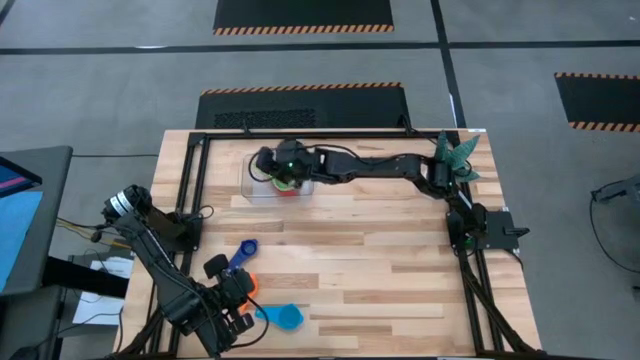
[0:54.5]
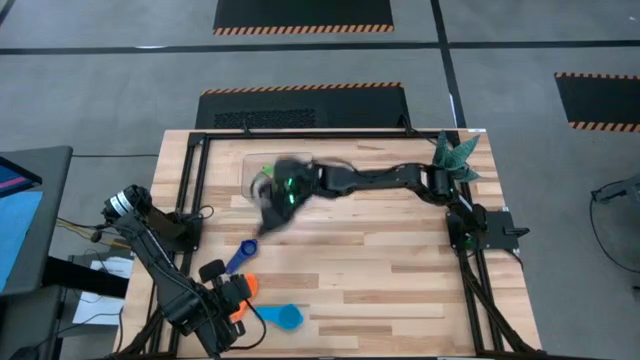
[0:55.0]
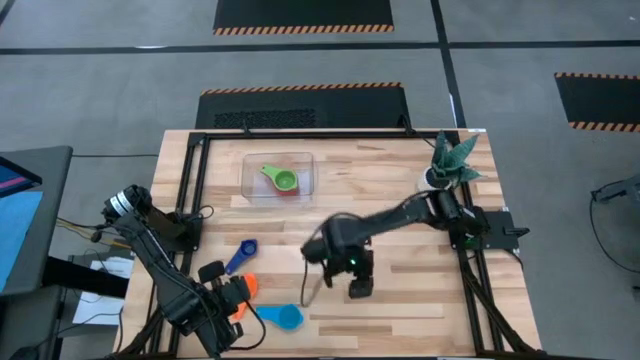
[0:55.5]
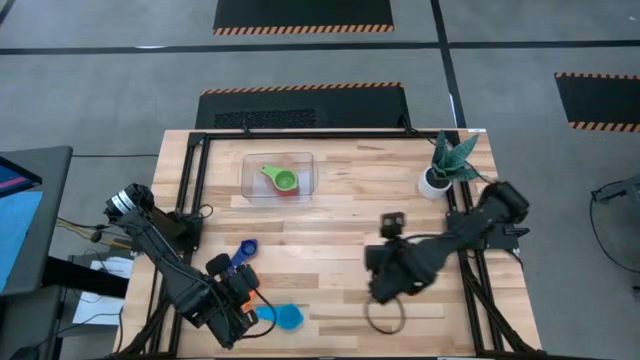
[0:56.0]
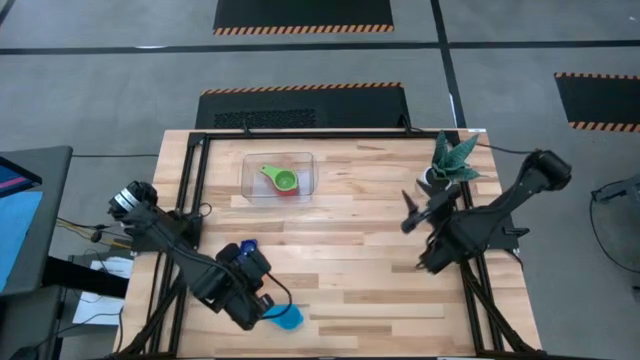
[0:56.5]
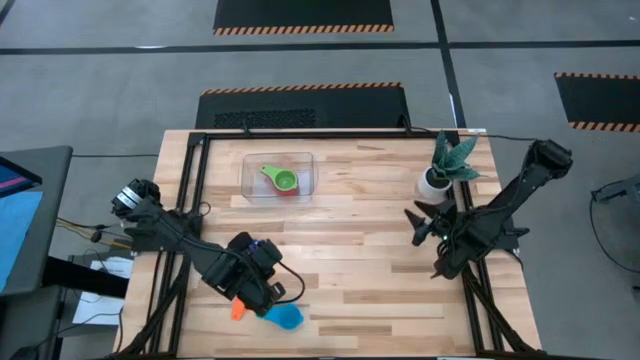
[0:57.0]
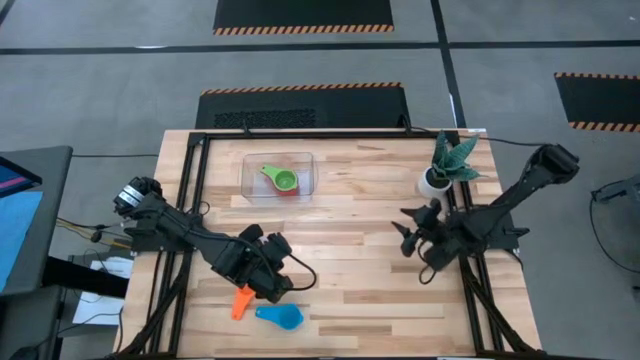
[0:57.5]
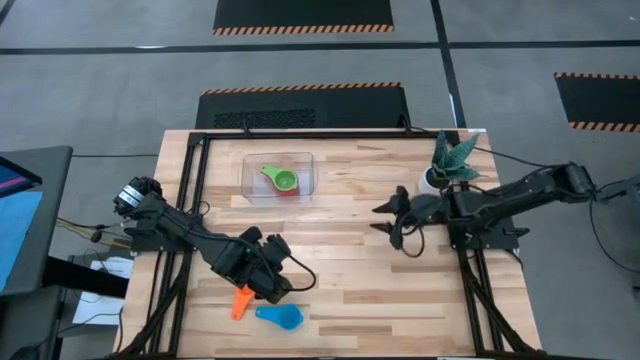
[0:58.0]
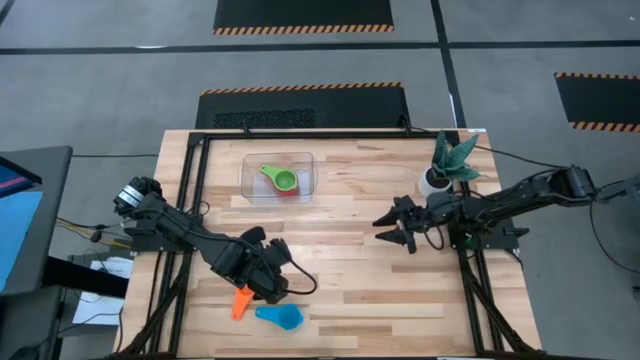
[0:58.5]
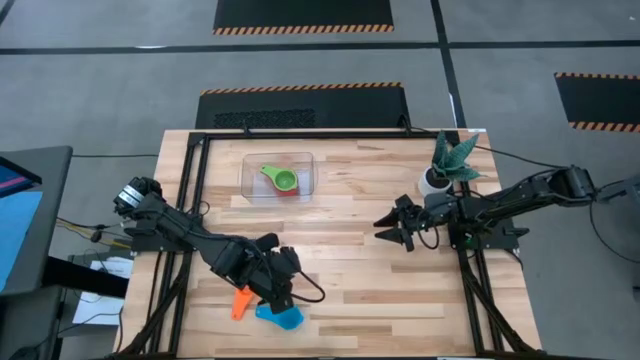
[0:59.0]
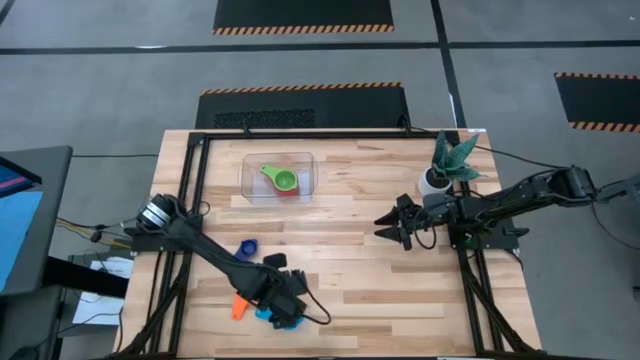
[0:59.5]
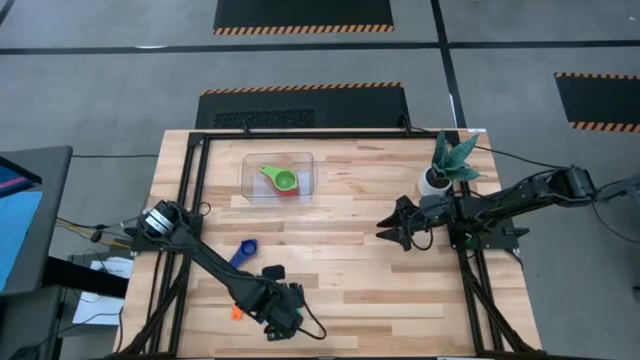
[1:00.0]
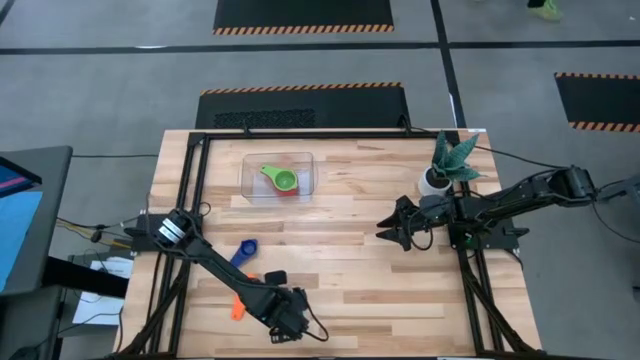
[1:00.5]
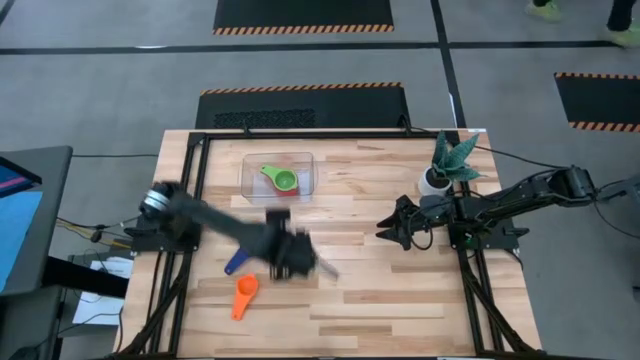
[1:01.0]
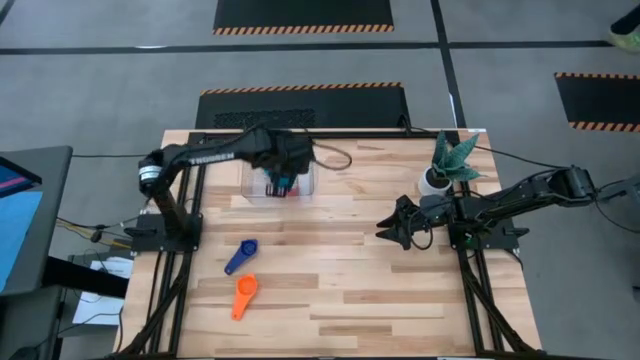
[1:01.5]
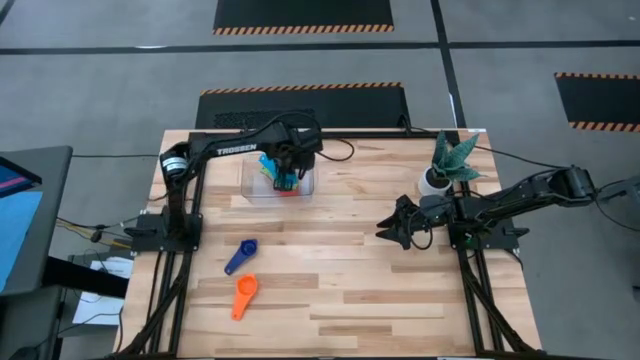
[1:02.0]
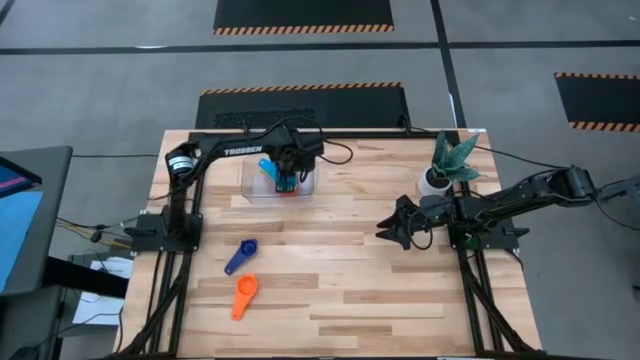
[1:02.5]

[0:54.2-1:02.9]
Task: Nest measuring cups in basket
Stack the light blue measuring cup into the green measuring cup in the transparent bin

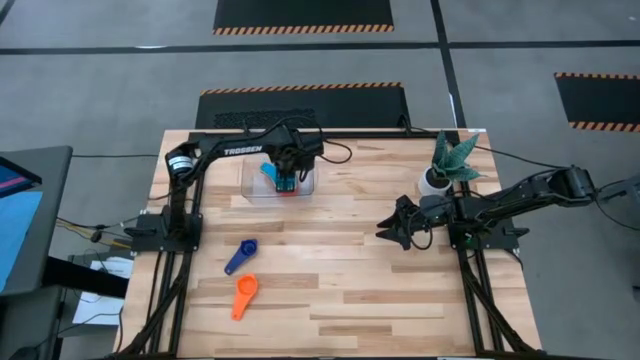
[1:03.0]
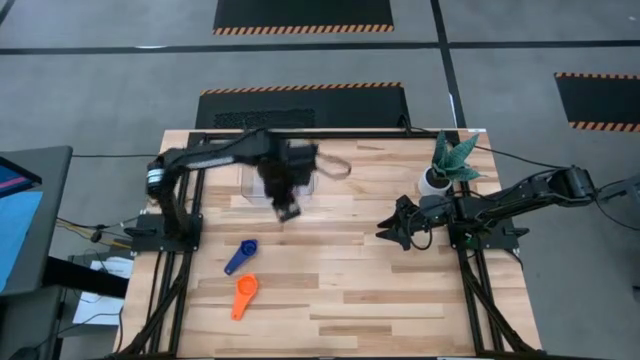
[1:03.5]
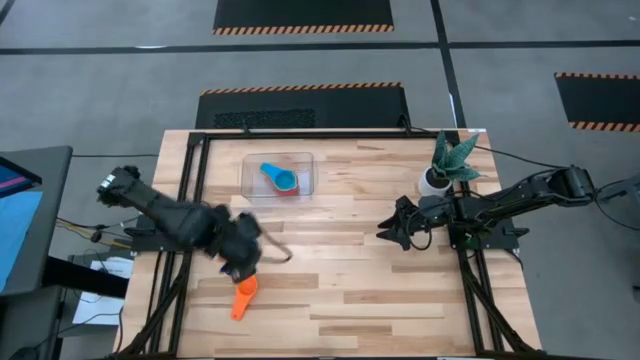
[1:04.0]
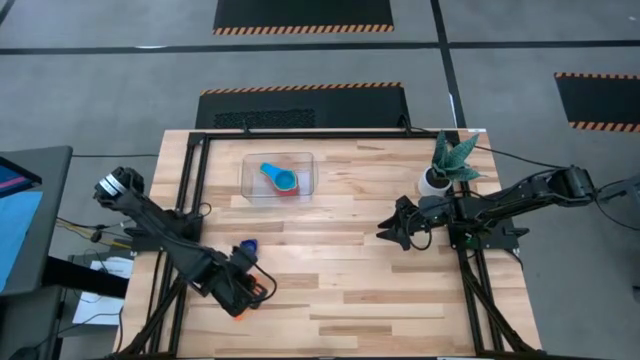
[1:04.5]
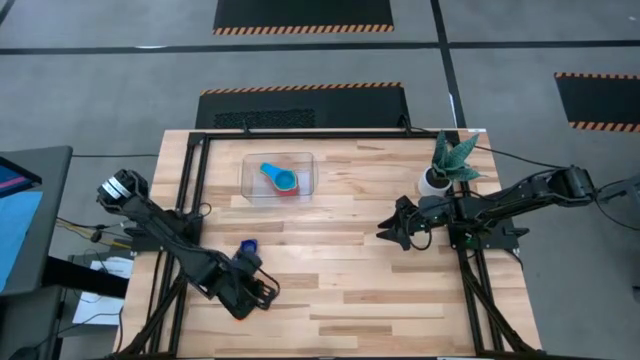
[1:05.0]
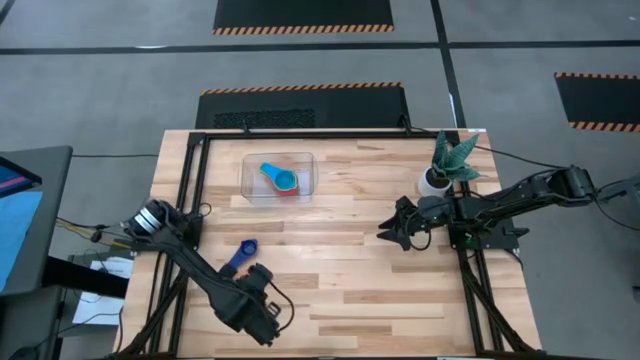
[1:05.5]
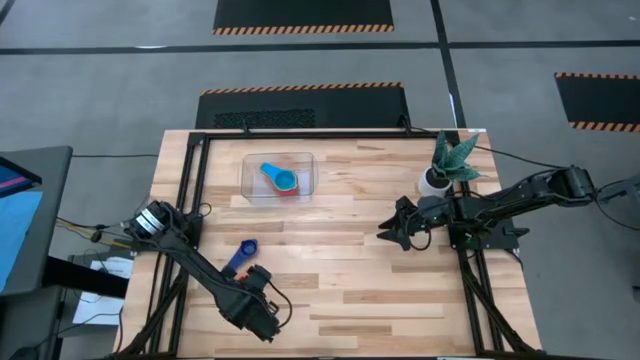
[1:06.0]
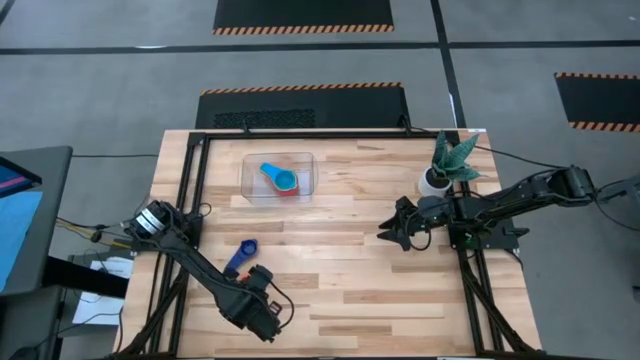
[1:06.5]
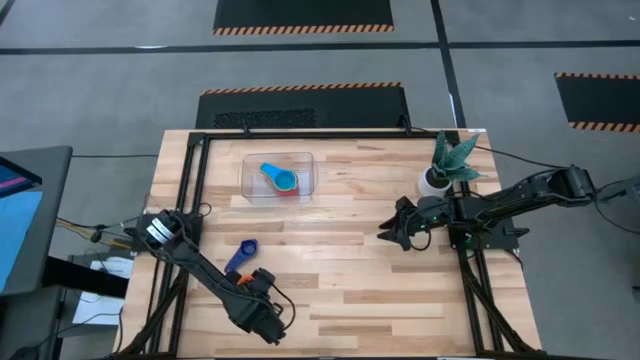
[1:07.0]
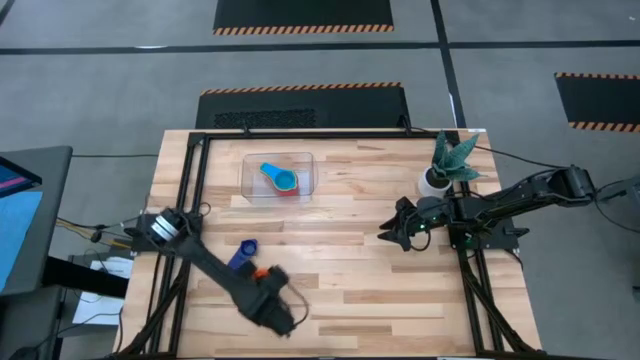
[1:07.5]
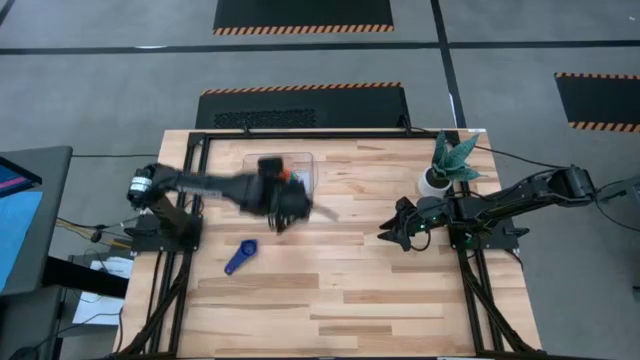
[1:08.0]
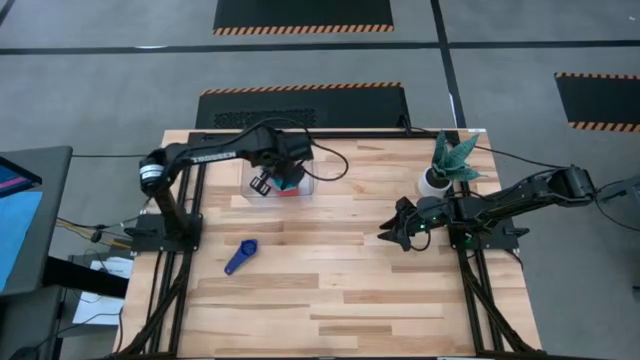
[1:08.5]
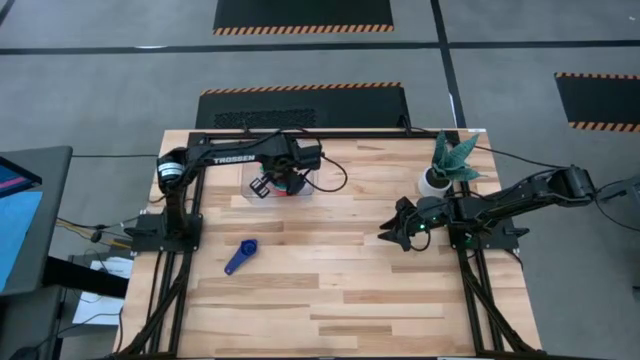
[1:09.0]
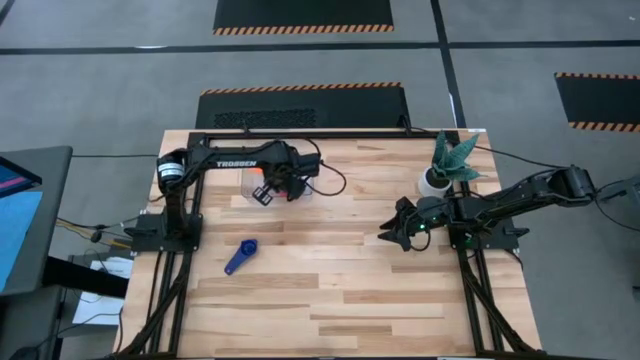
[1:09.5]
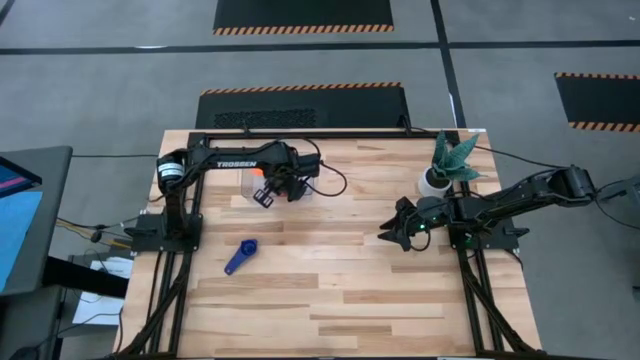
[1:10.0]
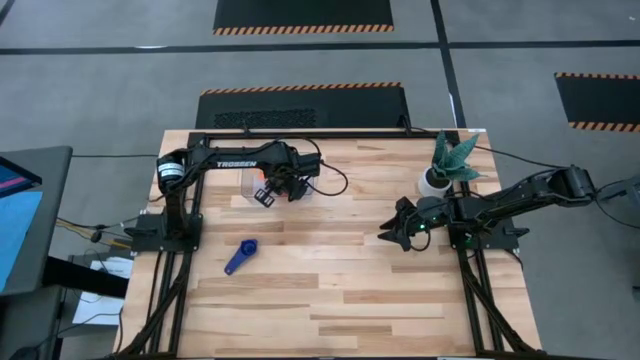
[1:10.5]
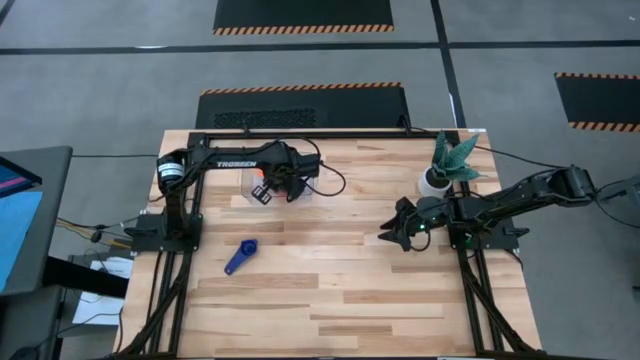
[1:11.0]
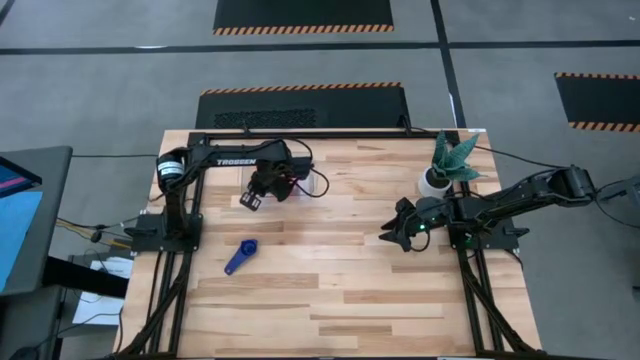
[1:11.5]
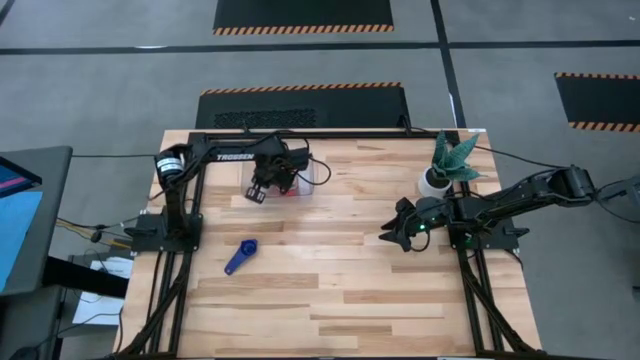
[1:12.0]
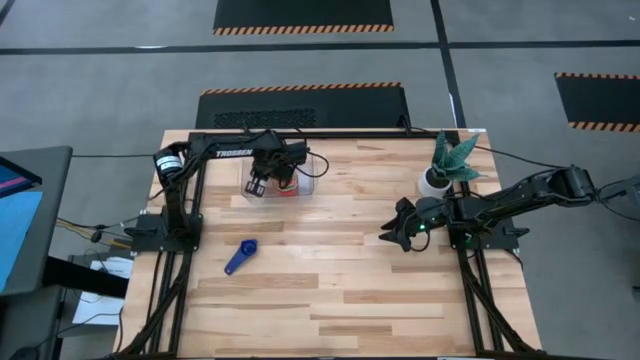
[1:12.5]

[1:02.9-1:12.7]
Stack the orange measuring cup into the light blue measuring cup in the transparent bin

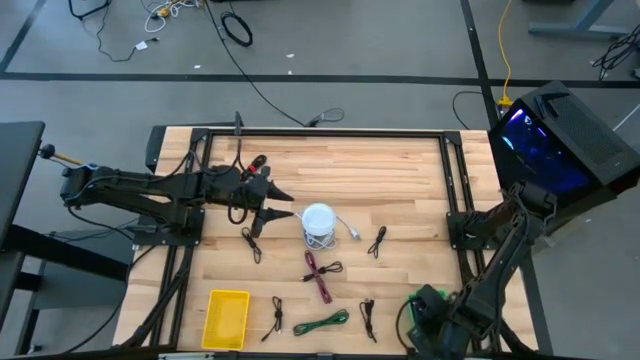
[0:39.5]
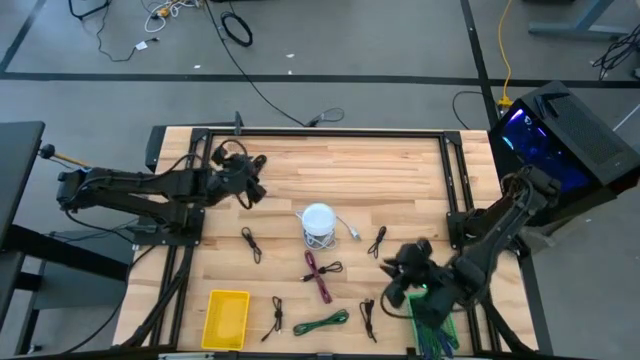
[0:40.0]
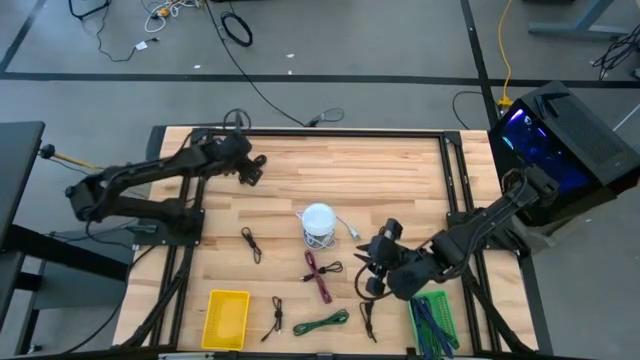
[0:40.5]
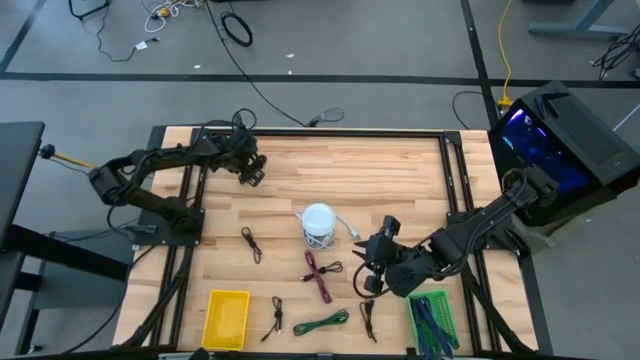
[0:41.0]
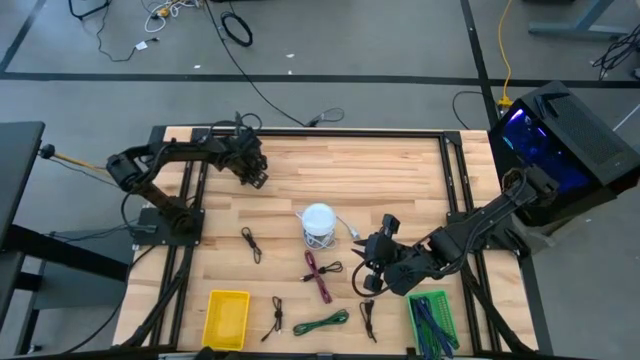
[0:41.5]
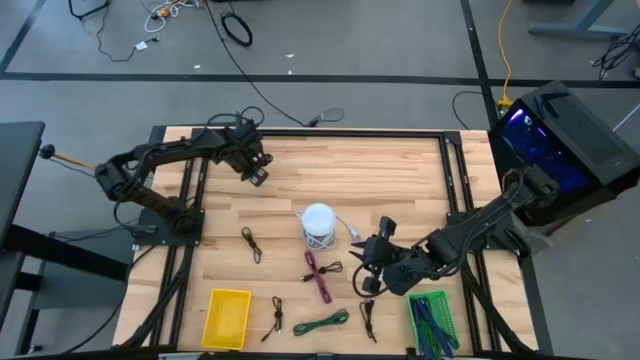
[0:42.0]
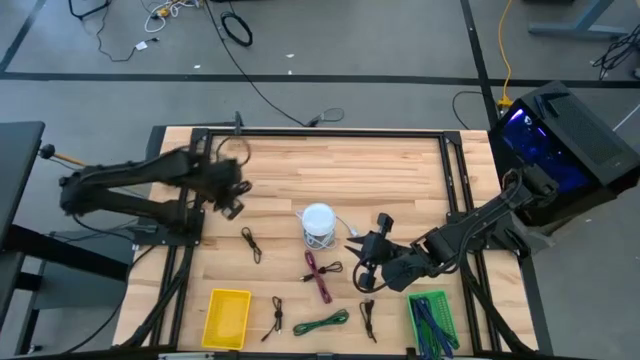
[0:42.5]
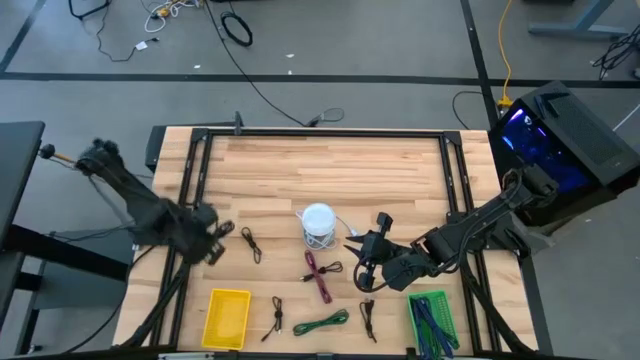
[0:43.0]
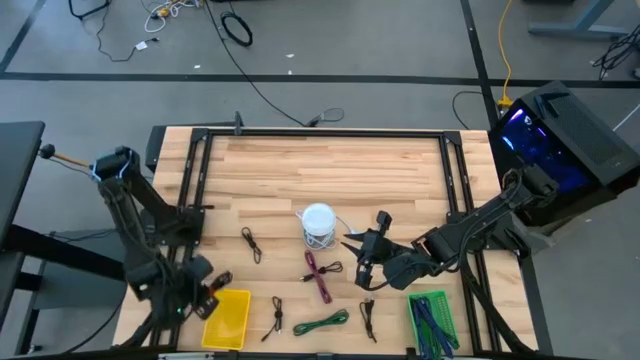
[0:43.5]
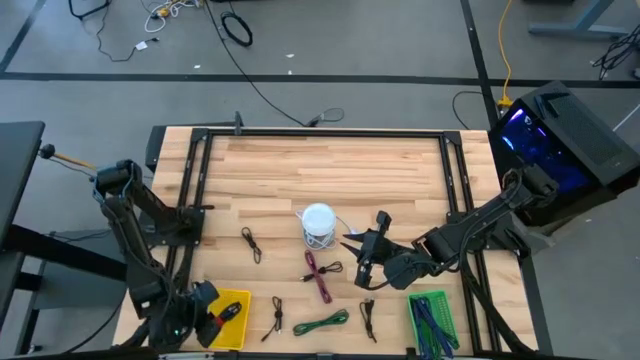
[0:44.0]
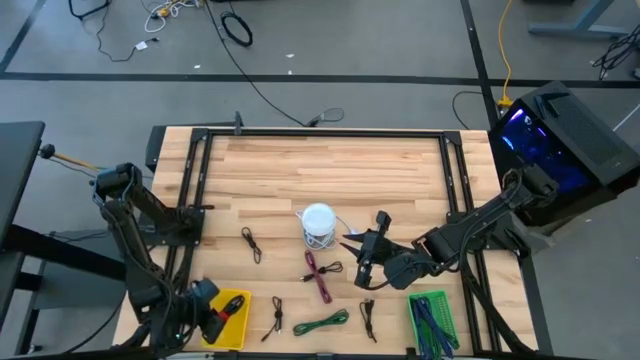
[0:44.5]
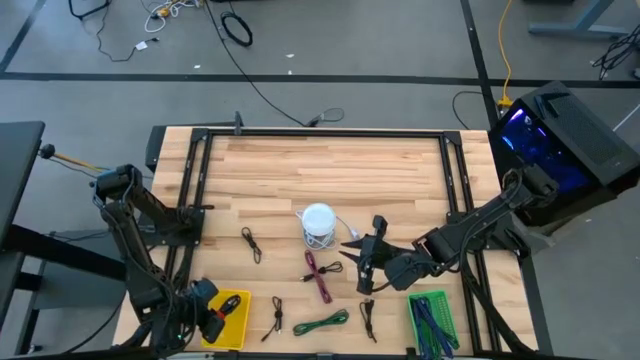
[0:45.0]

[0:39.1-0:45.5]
Task: Pick & Place USB Port
Put the top black charger cable into the yellow bin
